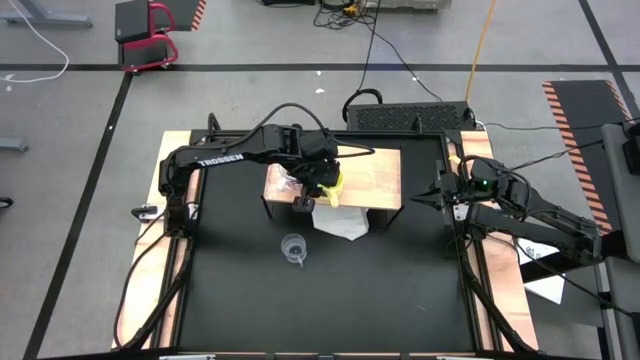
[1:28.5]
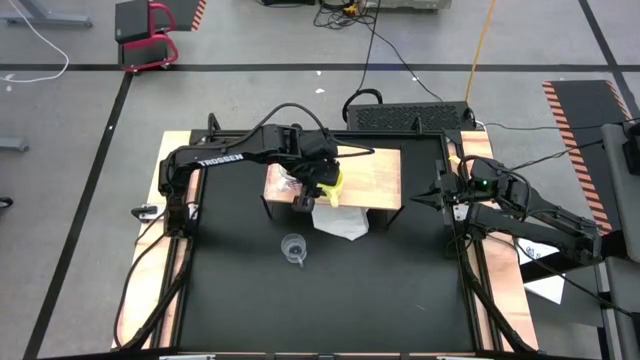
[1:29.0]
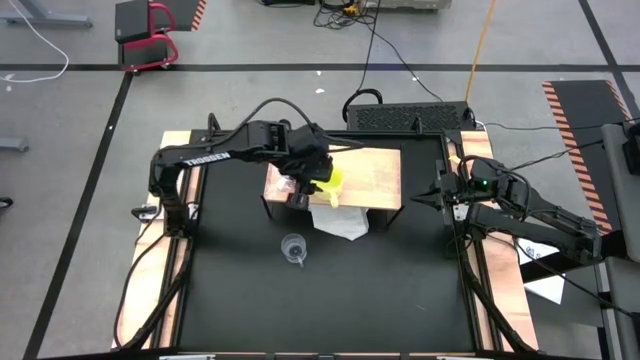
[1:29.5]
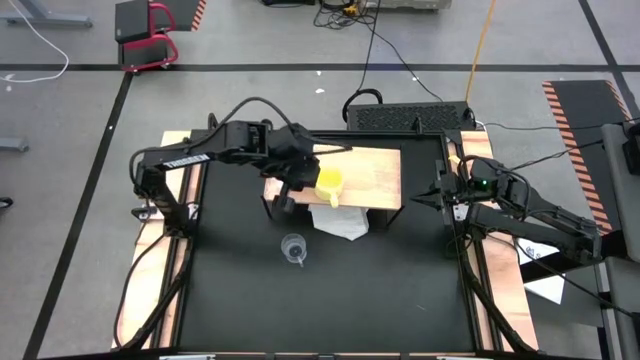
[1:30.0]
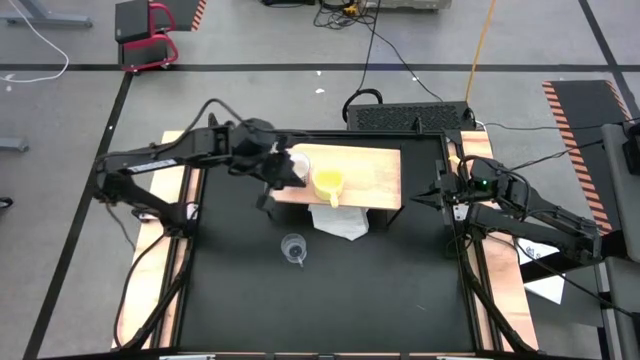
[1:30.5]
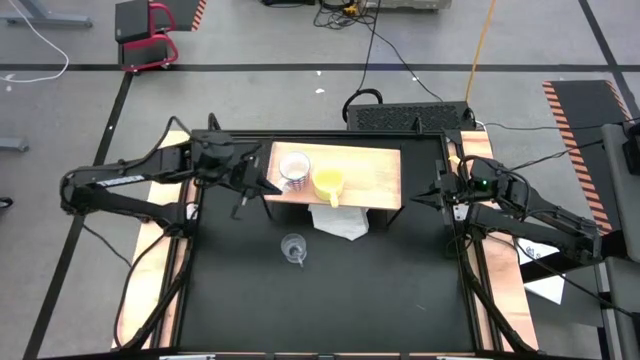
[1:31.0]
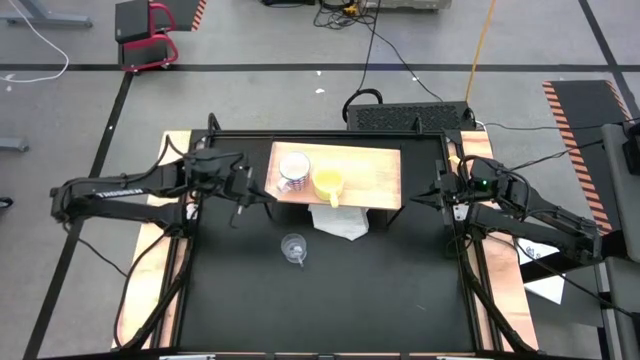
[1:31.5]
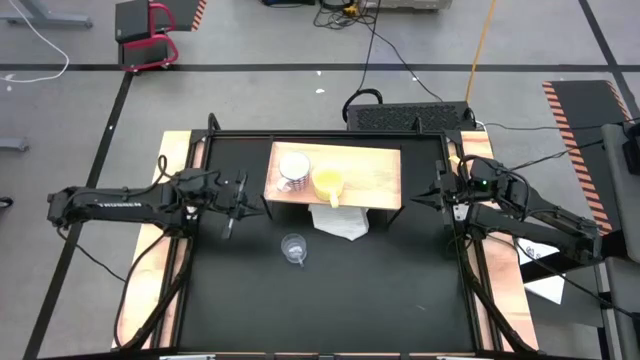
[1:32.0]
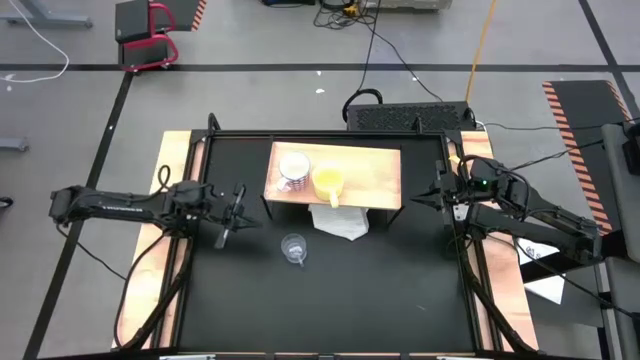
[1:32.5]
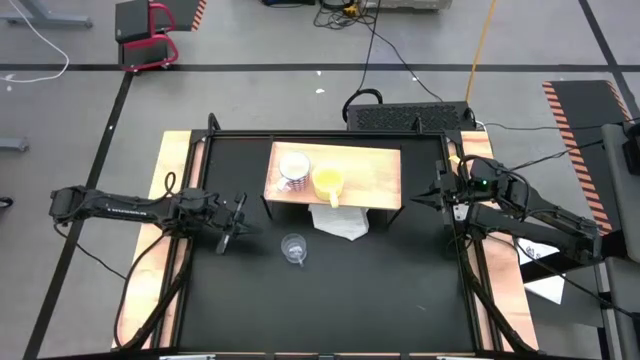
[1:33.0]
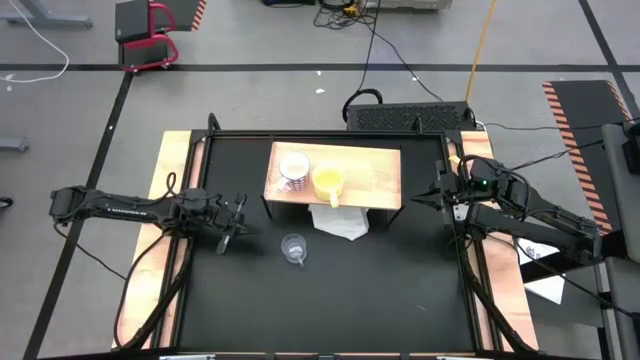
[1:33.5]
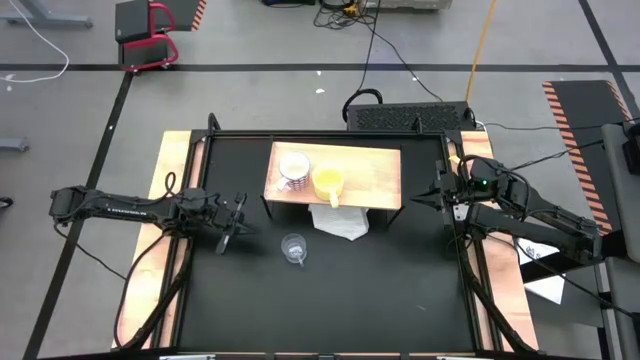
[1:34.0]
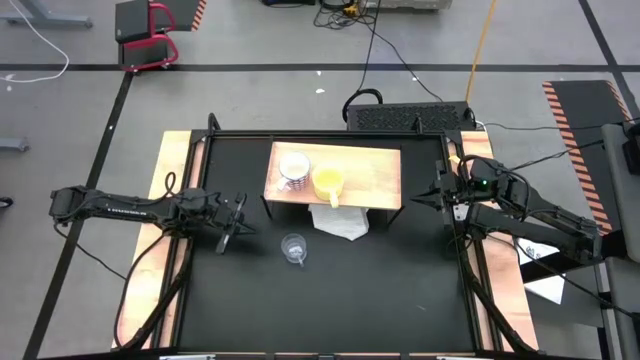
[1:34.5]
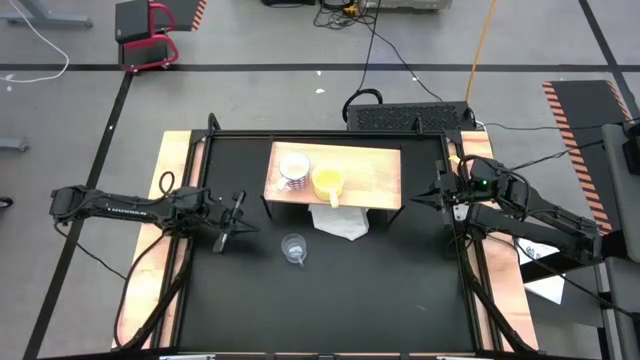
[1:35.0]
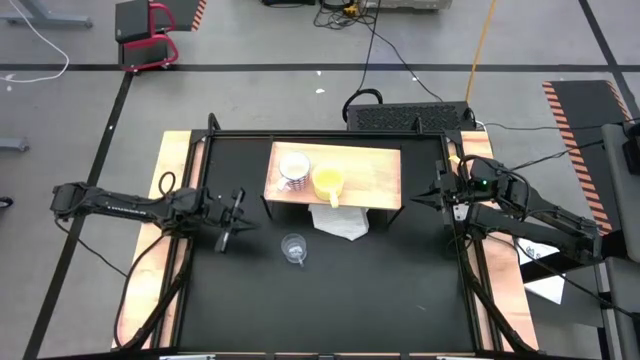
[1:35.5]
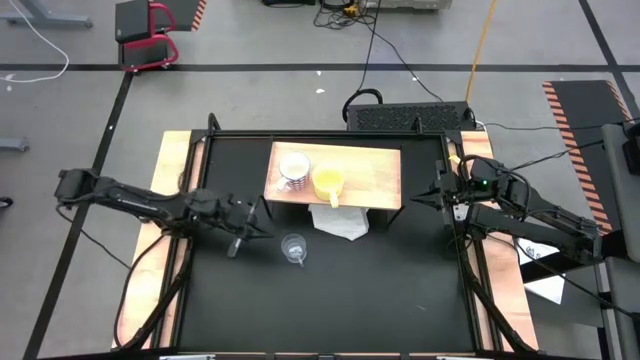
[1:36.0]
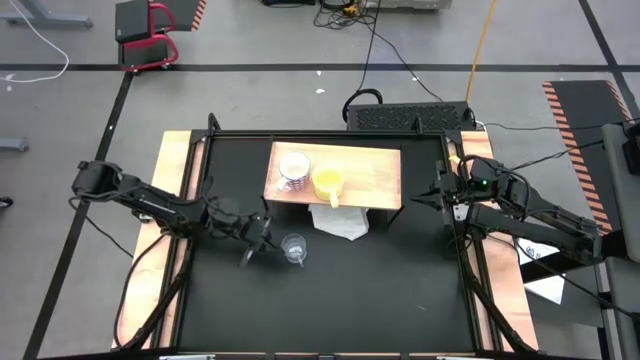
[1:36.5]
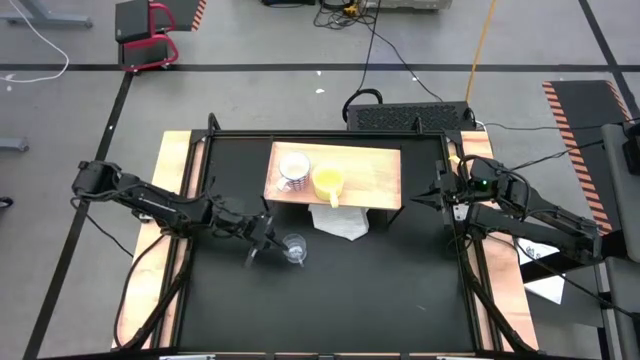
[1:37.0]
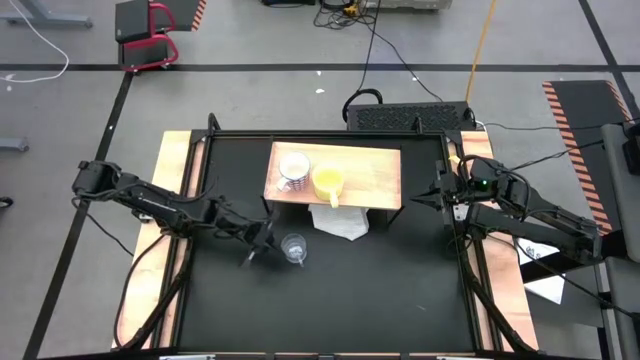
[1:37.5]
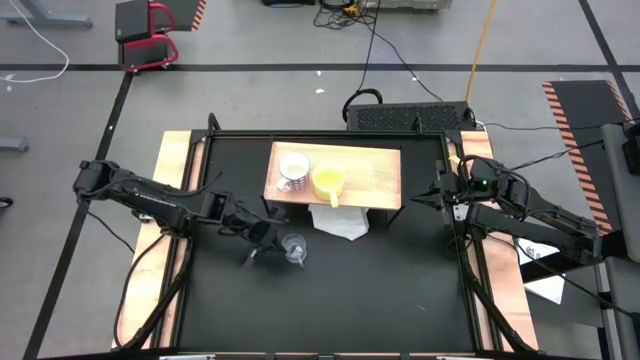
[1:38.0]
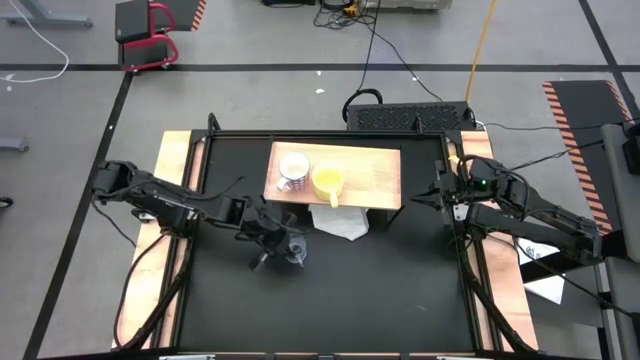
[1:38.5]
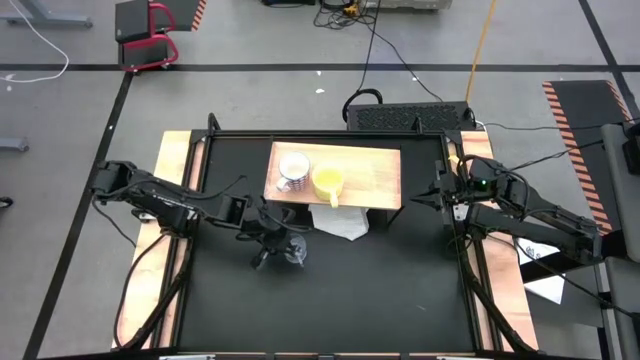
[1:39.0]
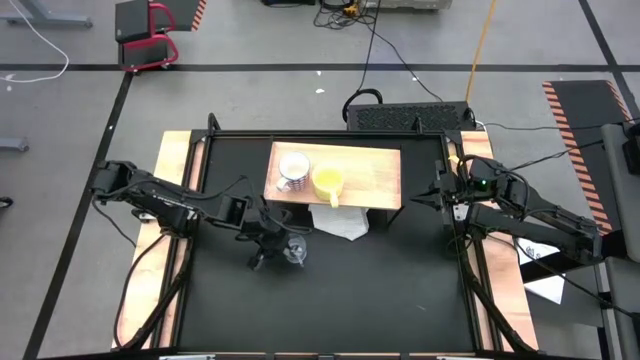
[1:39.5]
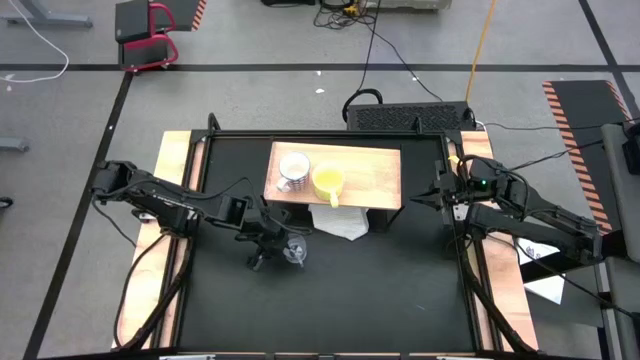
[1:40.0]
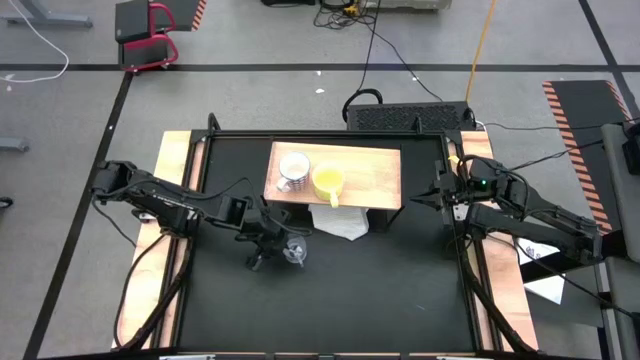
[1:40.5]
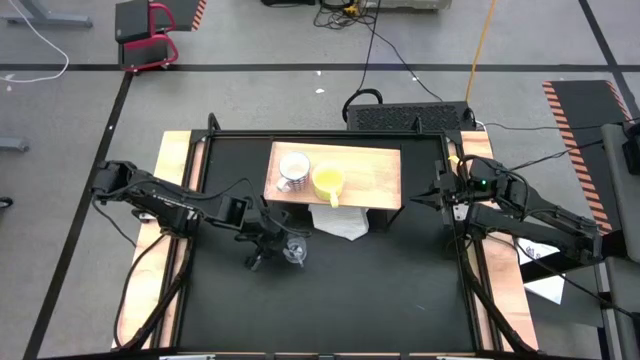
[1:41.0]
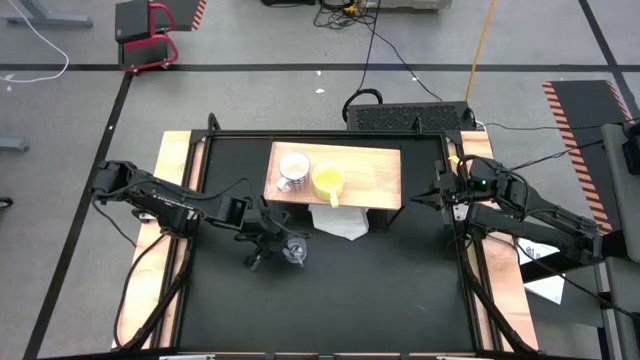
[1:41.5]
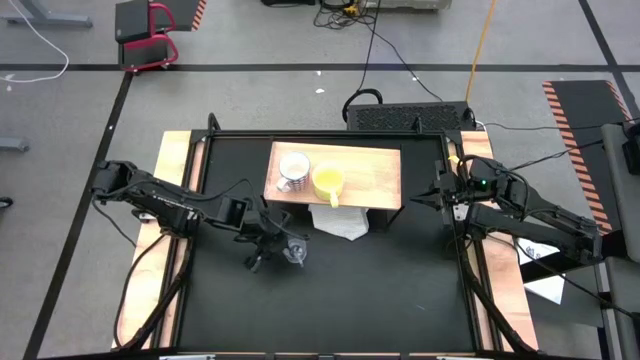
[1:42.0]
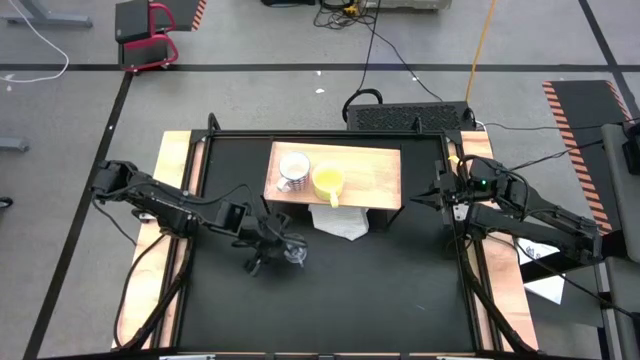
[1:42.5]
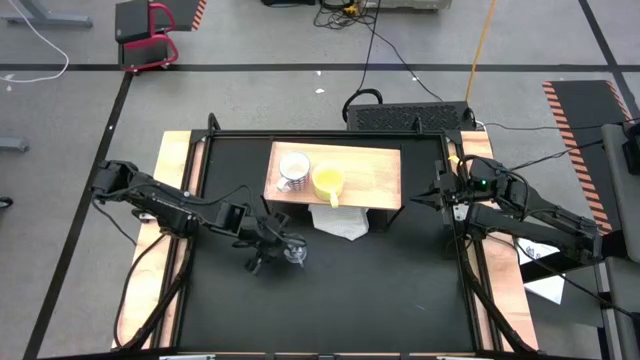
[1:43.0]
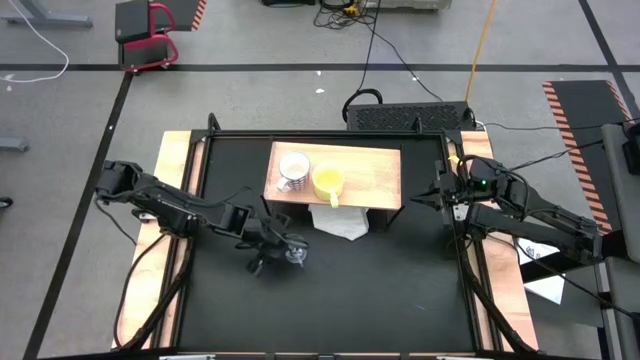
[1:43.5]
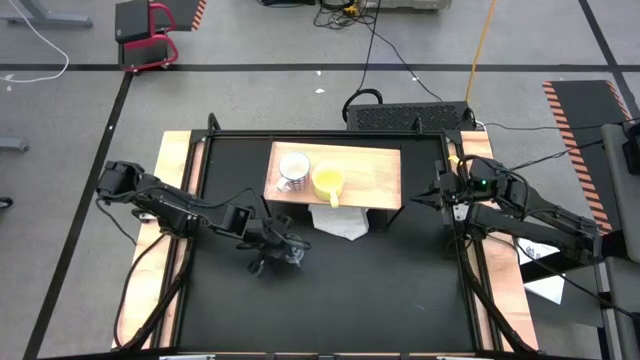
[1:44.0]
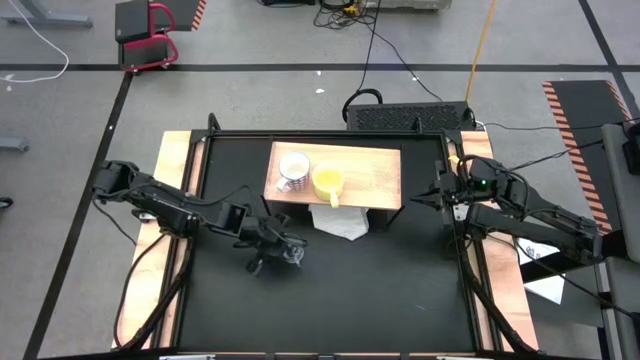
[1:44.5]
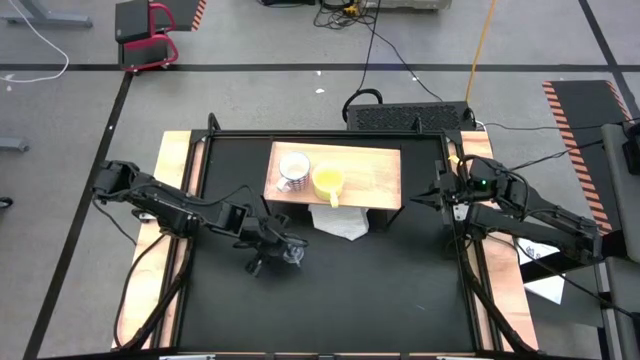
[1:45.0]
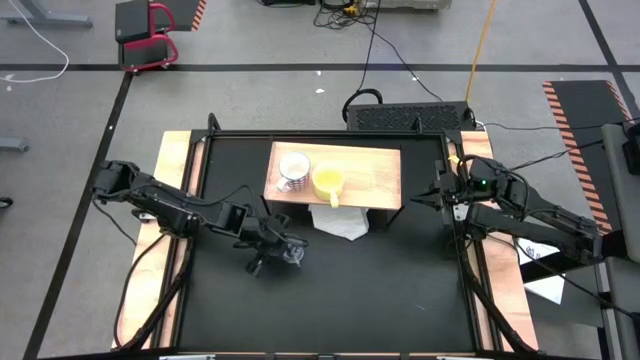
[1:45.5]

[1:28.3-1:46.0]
Task: Stack small to large cups/mugs on shelf
Put the transparent mug on the shelf
